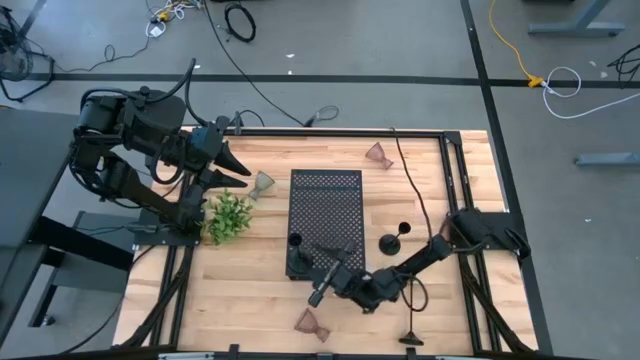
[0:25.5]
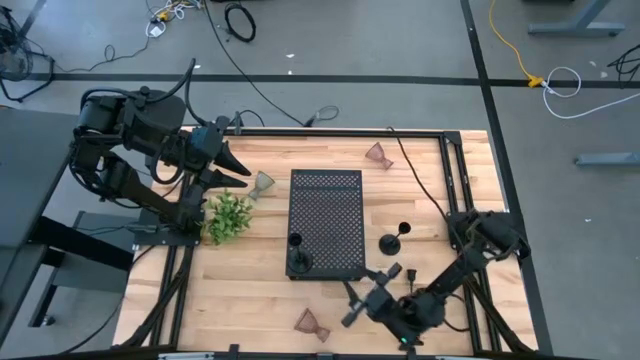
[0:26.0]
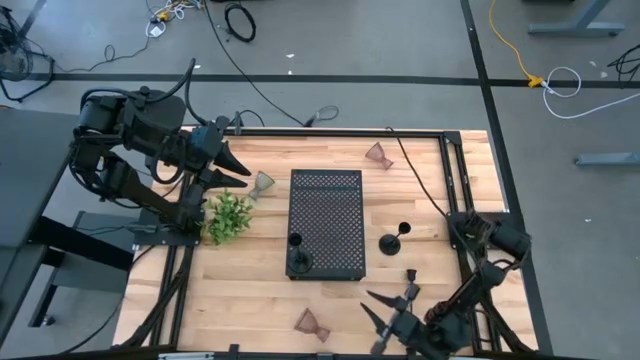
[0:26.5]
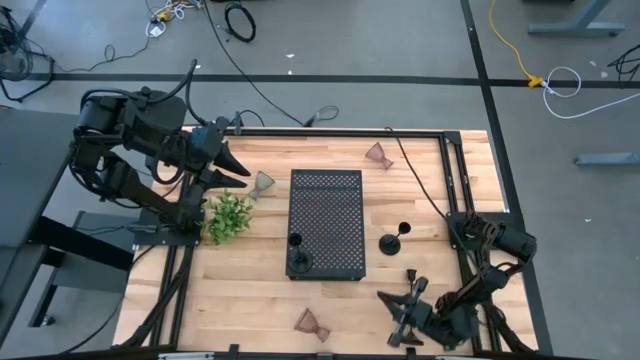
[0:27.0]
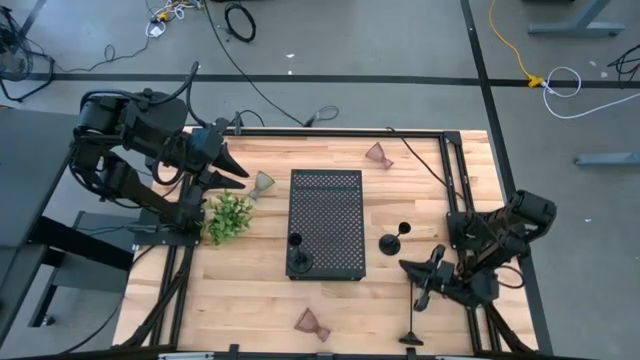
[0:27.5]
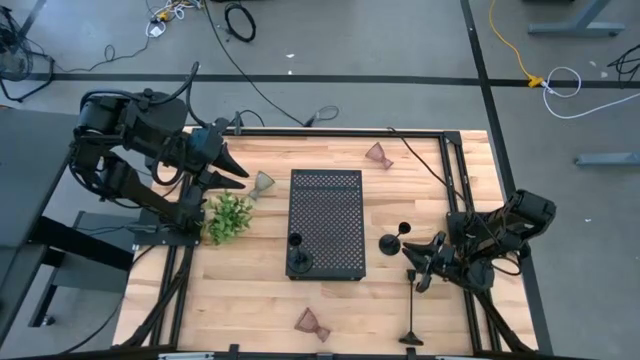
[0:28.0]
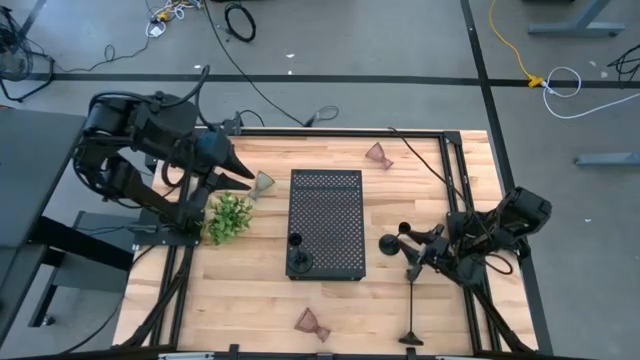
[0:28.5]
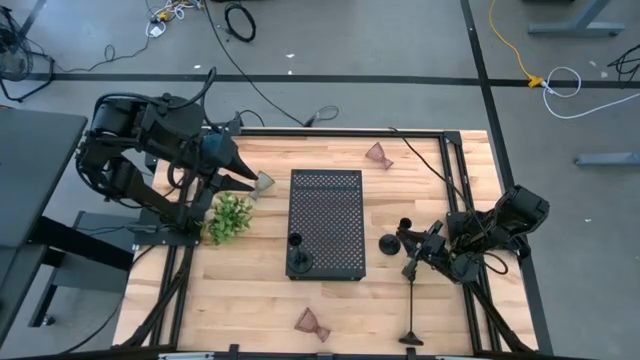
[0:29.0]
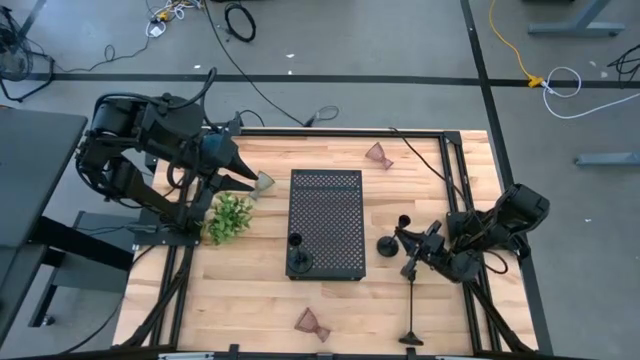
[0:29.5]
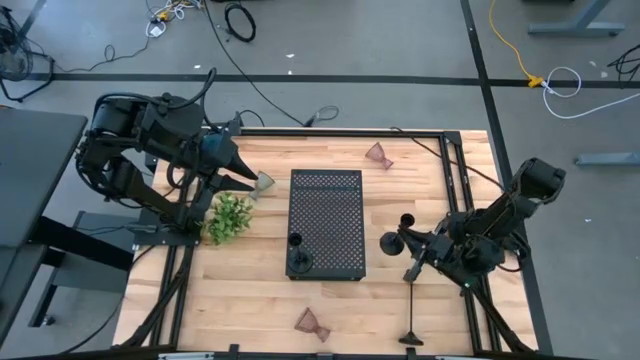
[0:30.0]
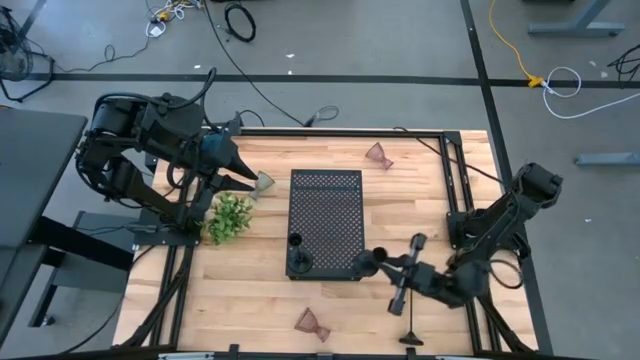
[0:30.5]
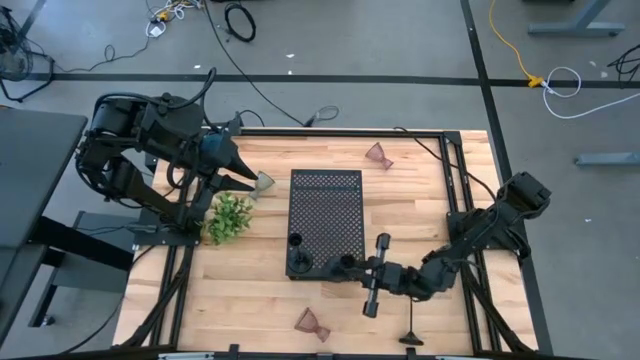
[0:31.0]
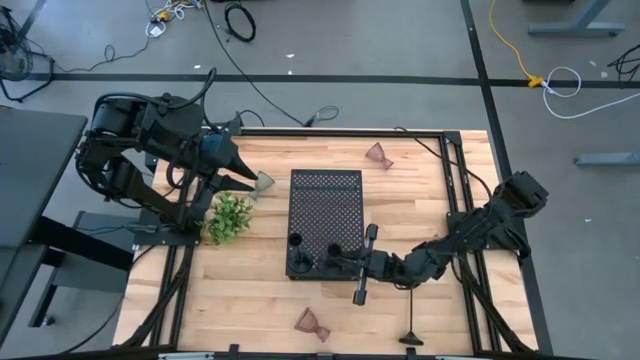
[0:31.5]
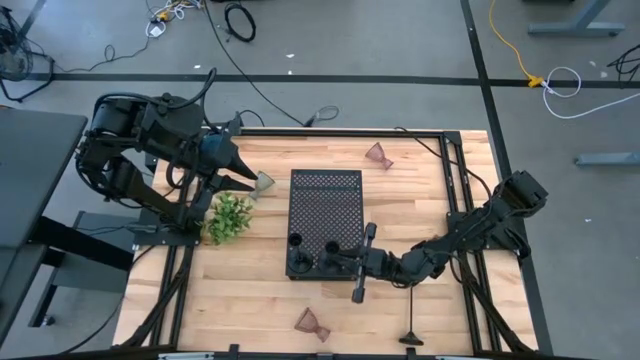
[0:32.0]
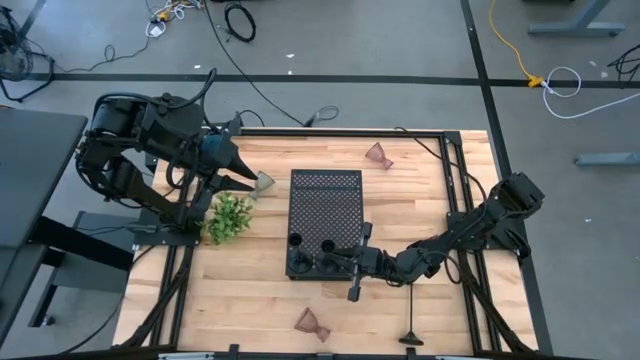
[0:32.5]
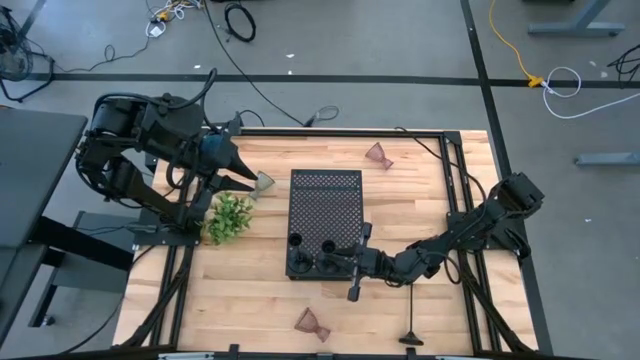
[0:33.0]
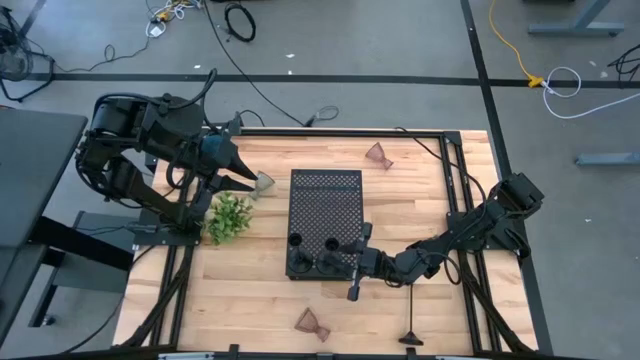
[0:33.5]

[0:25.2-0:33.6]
Task: Pick & Place candle stick holders
Put the top black candle holder on the shelf

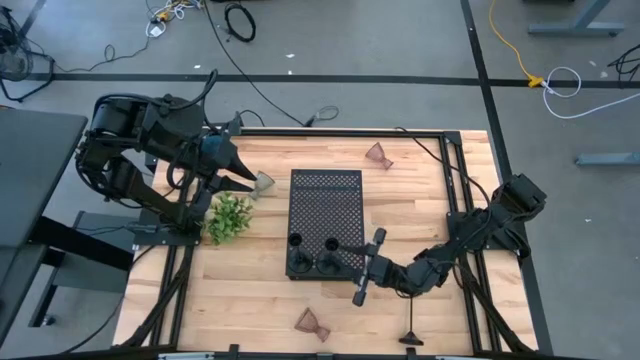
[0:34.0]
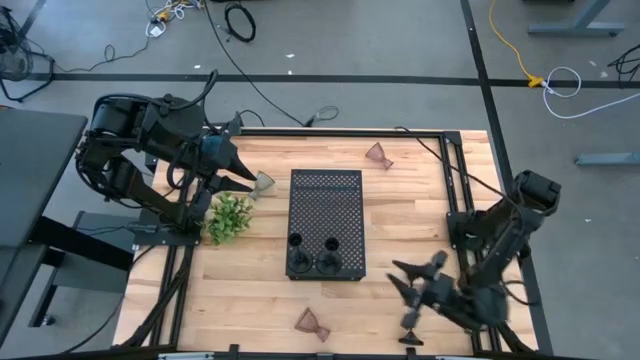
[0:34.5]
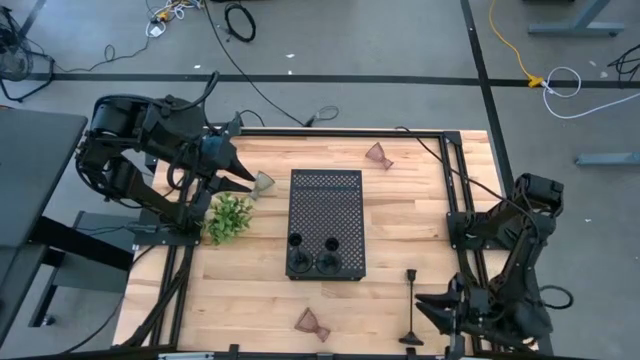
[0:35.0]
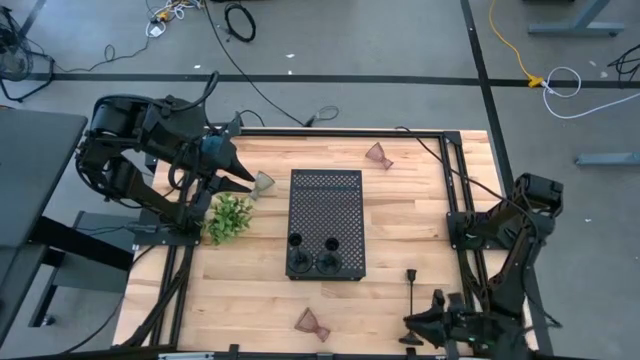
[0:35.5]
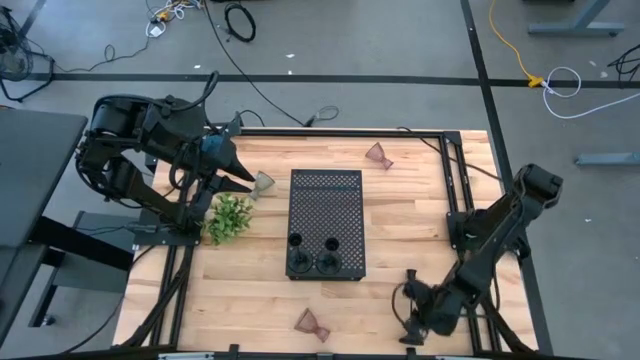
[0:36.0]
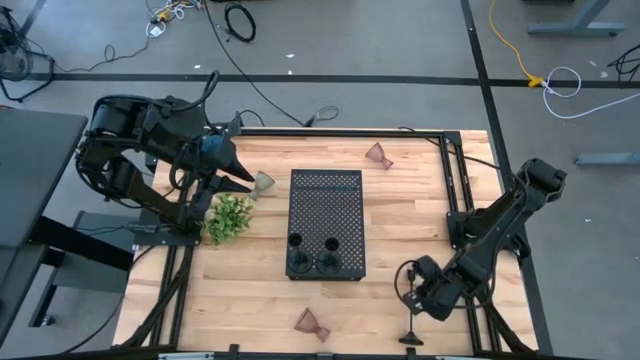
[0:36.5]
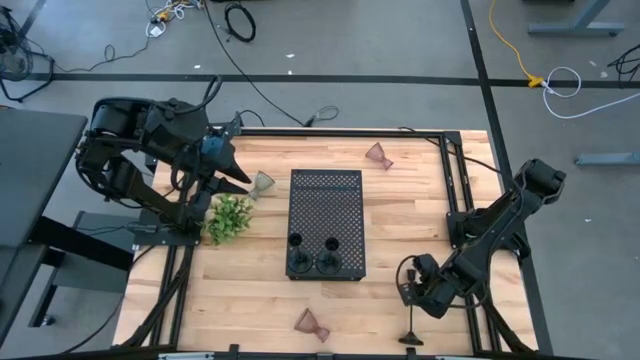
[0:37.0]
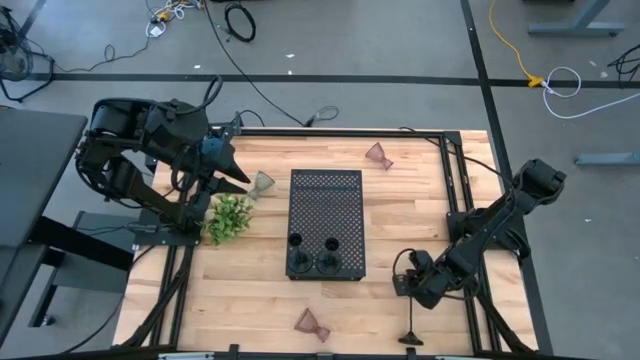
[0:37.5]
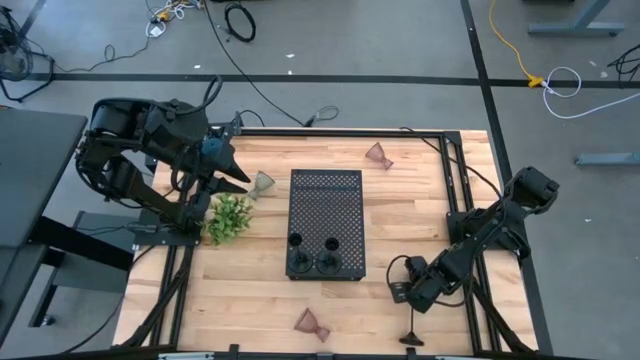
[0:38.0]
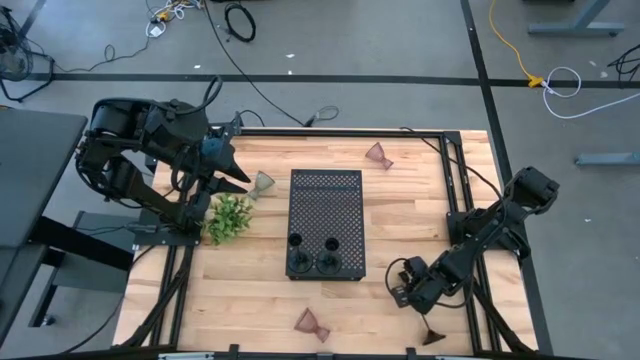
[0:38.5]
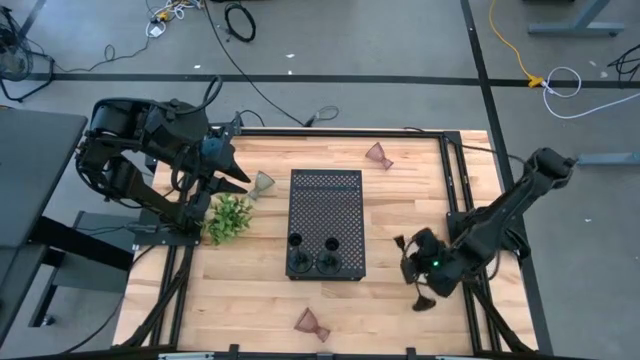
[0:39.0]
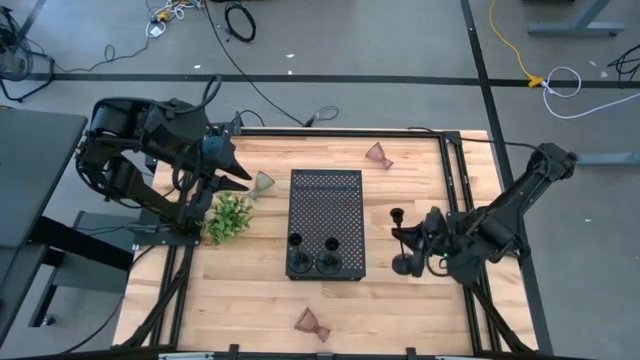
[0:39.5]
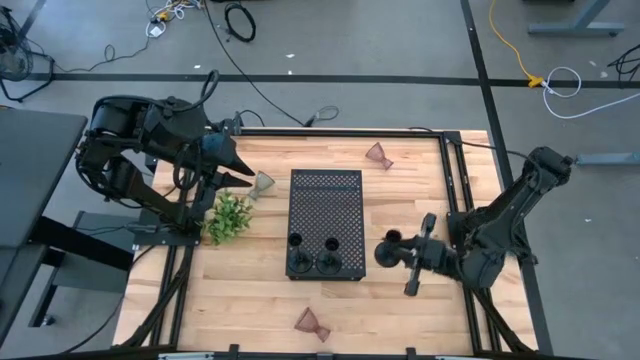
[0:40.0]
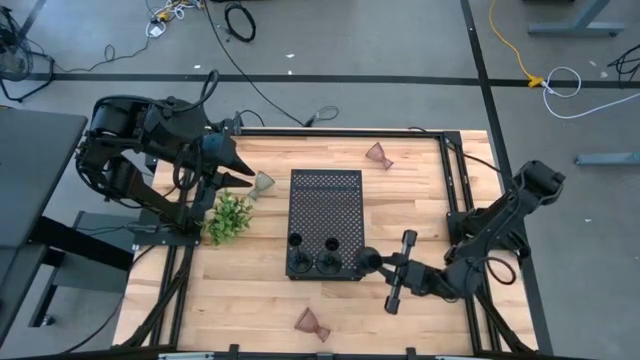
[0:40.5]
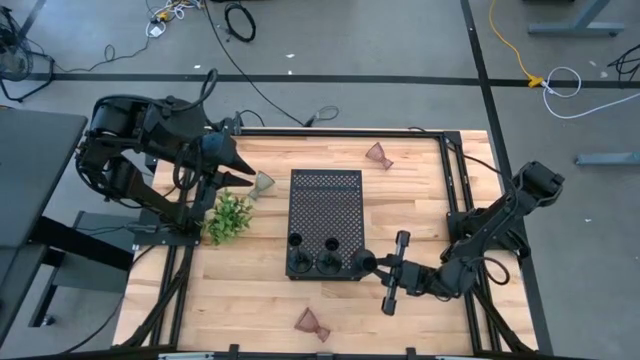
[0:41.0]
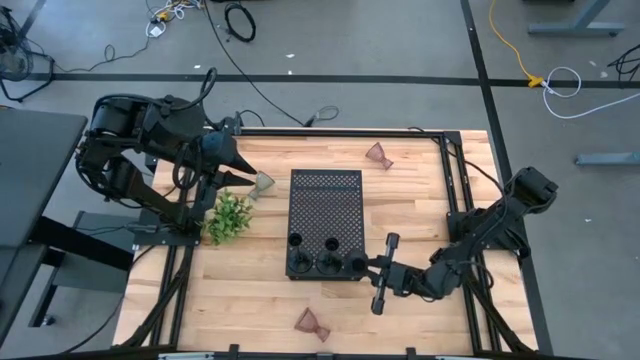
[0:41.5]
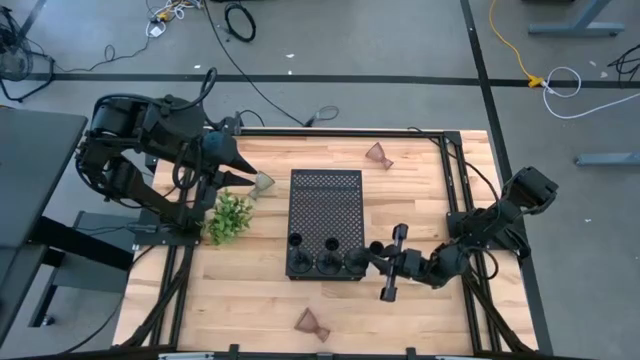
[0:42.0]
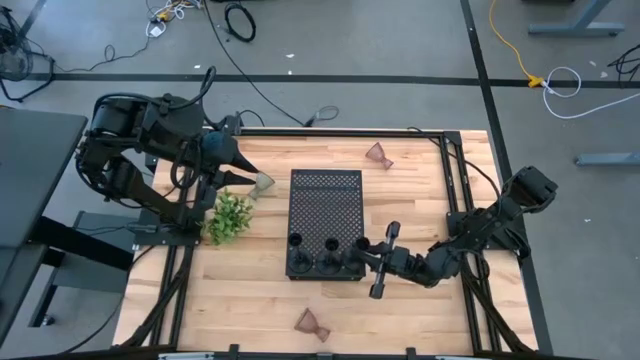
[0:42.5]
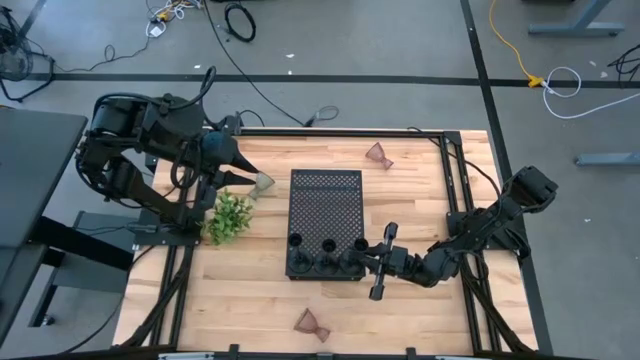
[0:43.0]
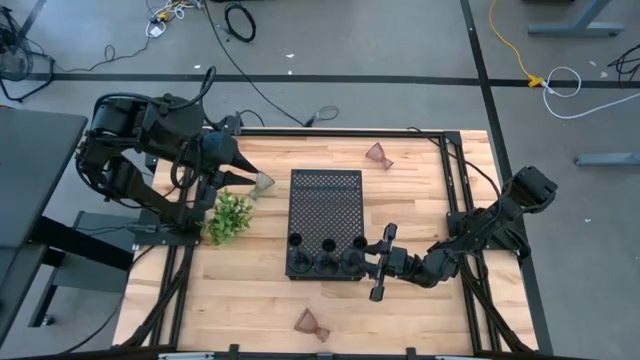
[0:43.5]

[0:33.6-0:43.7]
Put the black candle holder on the shelf

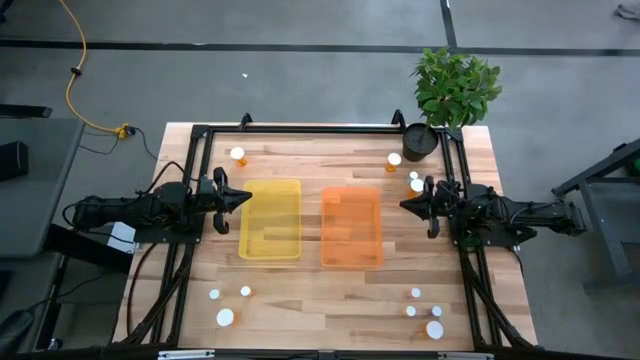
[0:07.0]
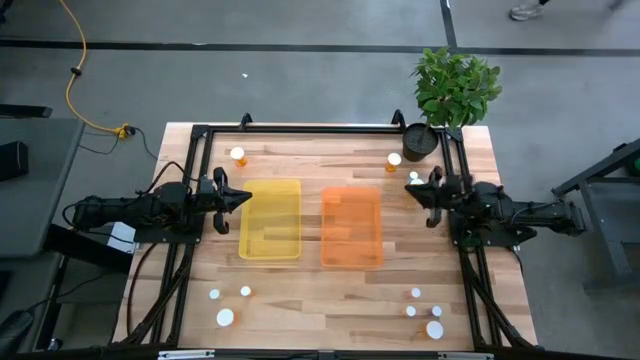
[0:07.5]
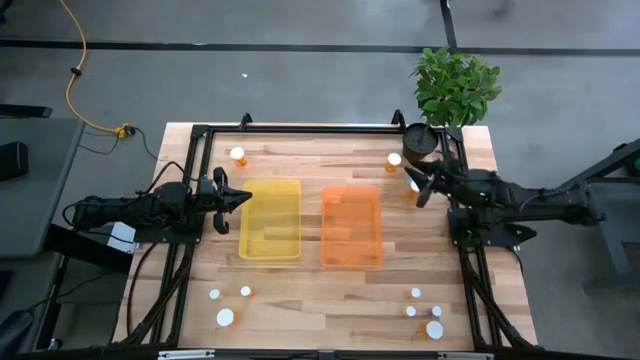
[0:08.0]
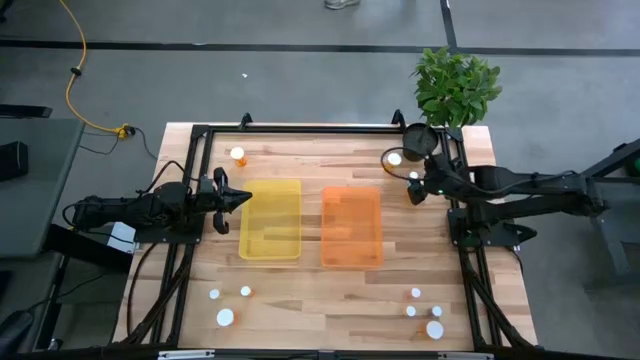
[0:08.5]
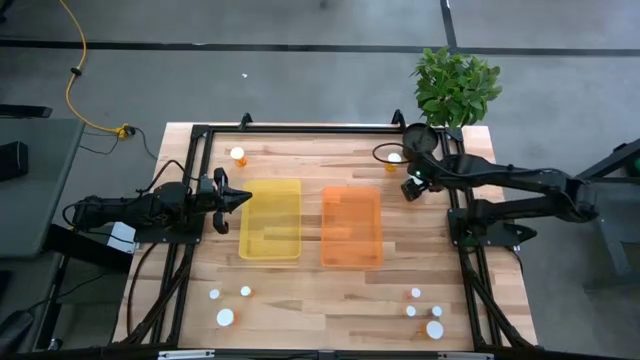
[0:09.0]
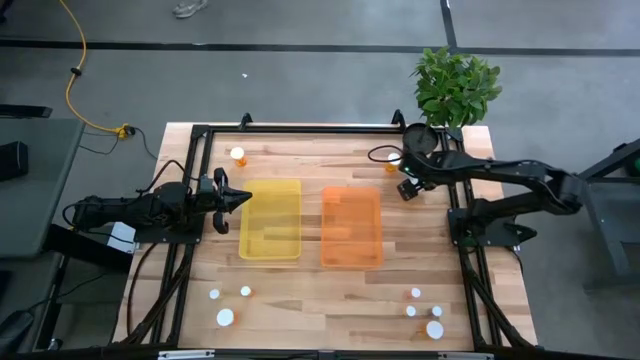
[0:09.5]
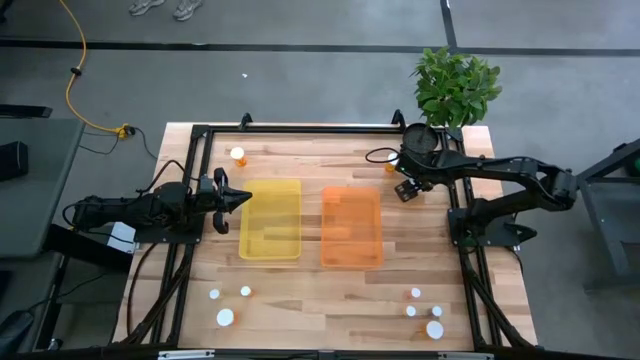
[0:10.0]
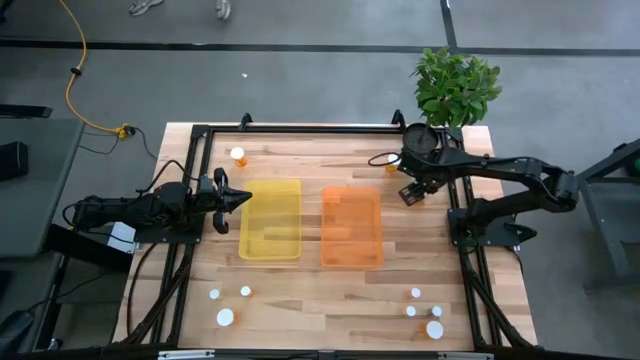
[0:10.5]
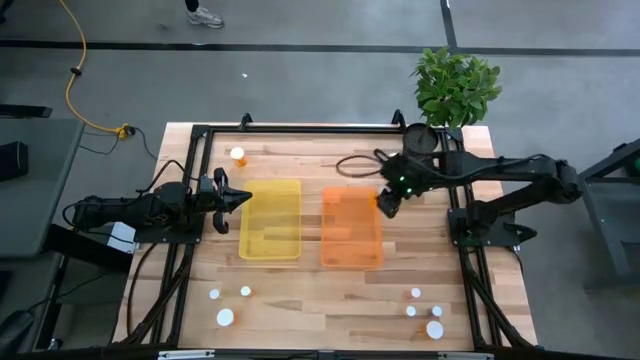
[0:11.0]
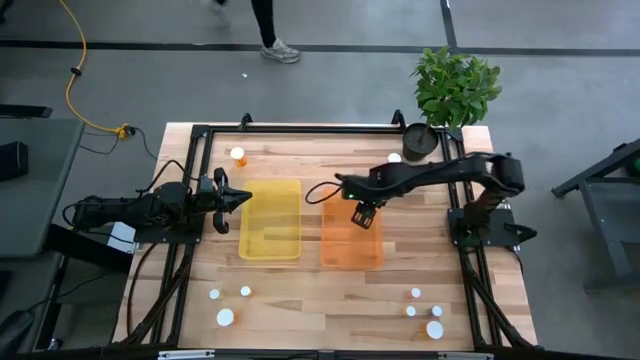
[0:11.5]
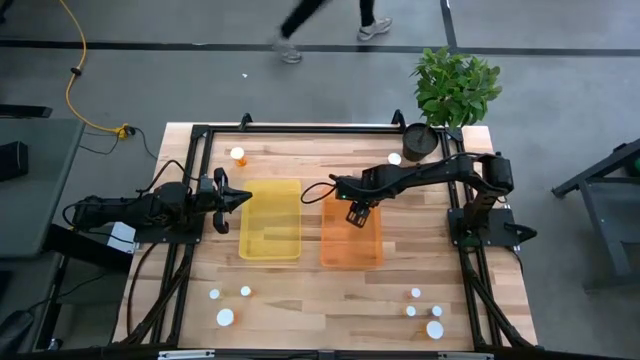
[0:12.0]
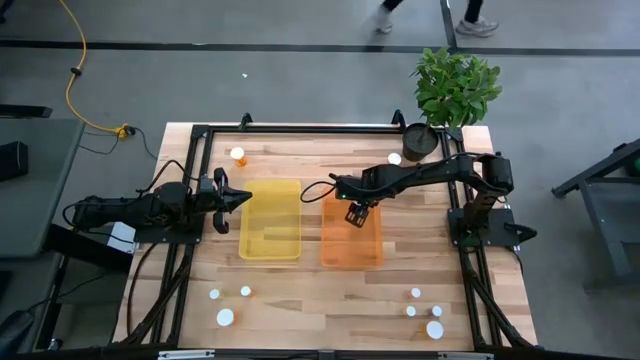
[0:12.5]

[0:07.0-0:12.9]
Task: Pick and place medicine bottles into bin by pill shape (circle, oval)
Put the orange capsule bottle into the orange bin
